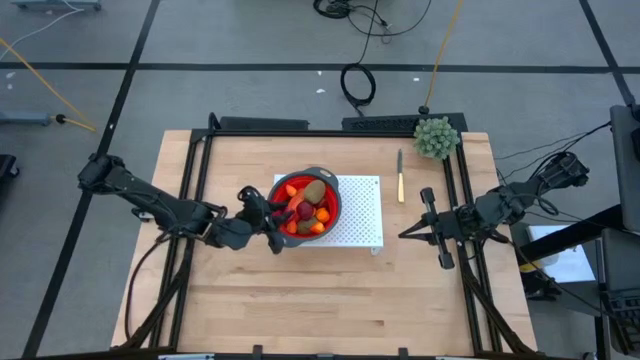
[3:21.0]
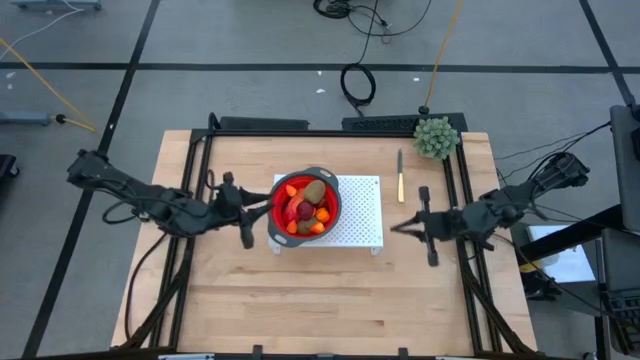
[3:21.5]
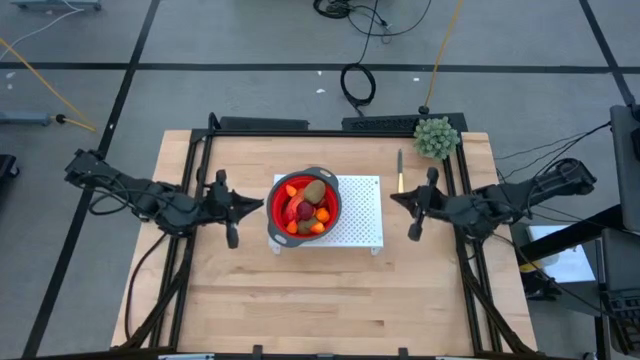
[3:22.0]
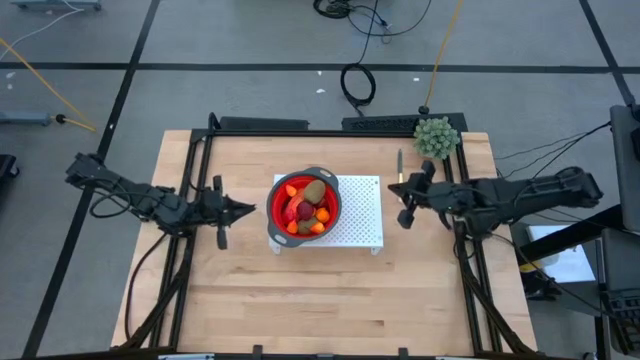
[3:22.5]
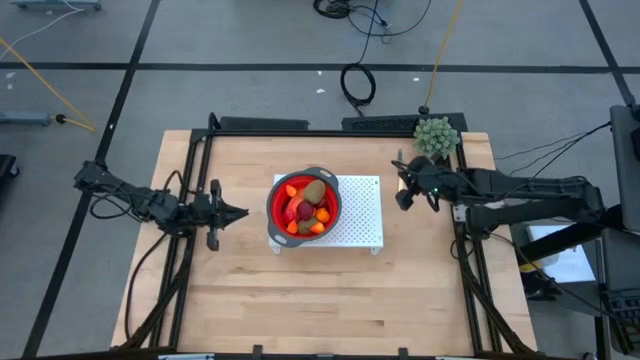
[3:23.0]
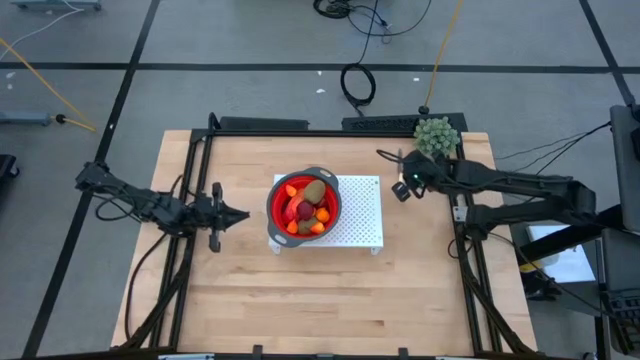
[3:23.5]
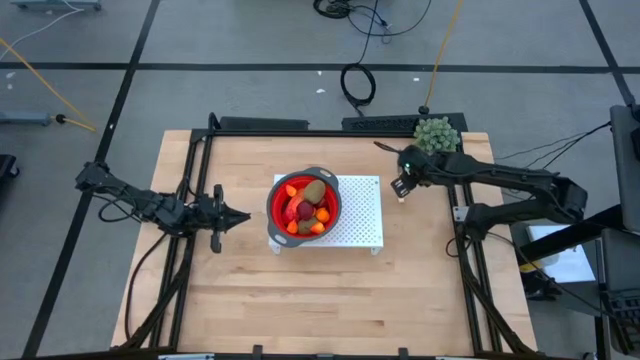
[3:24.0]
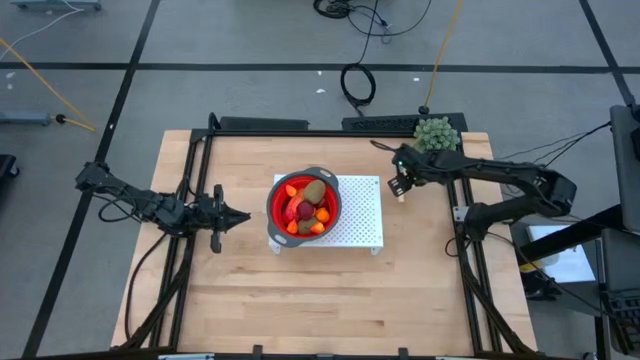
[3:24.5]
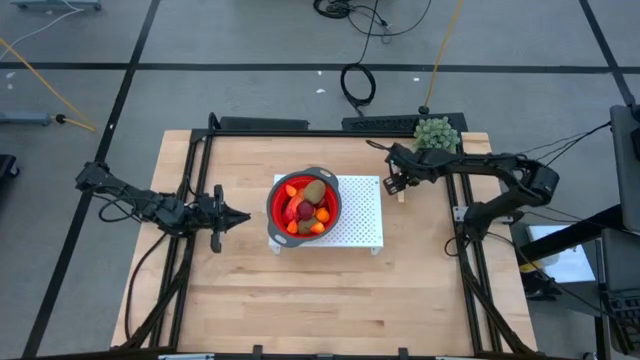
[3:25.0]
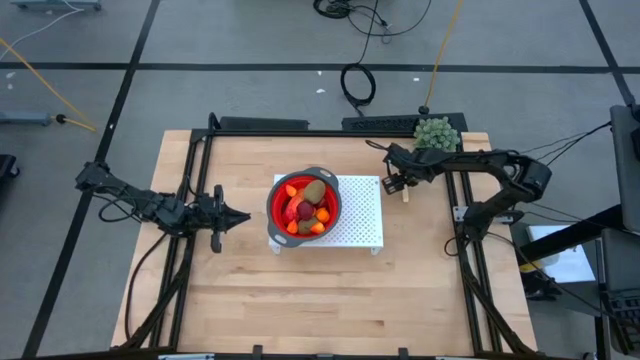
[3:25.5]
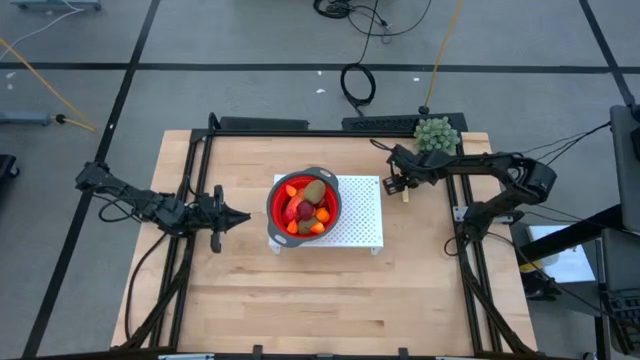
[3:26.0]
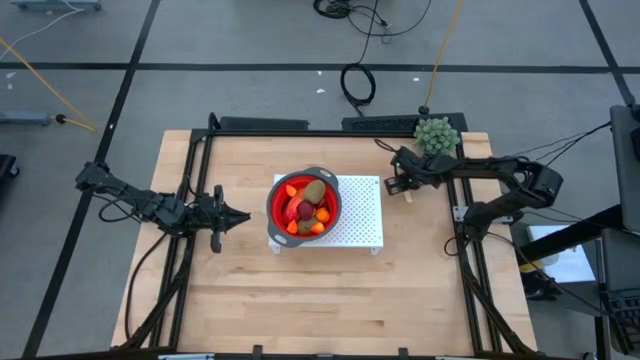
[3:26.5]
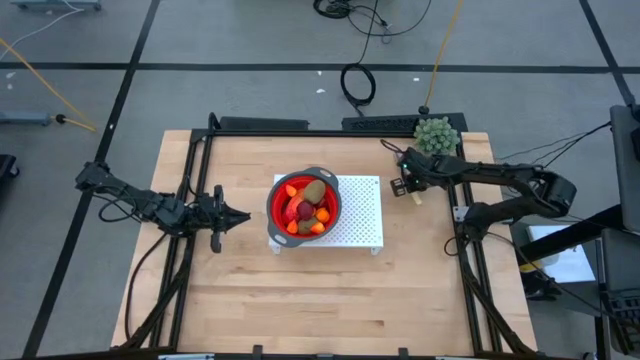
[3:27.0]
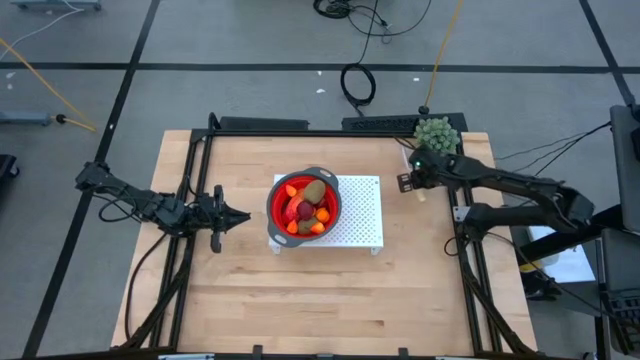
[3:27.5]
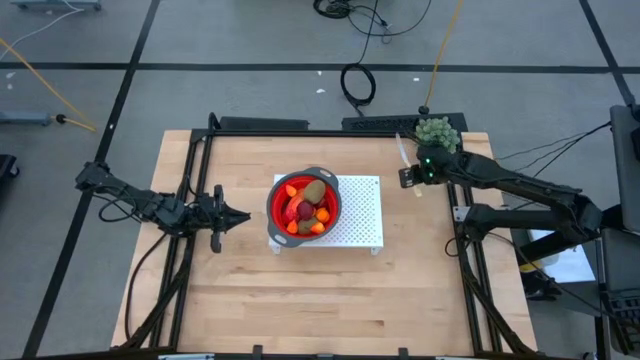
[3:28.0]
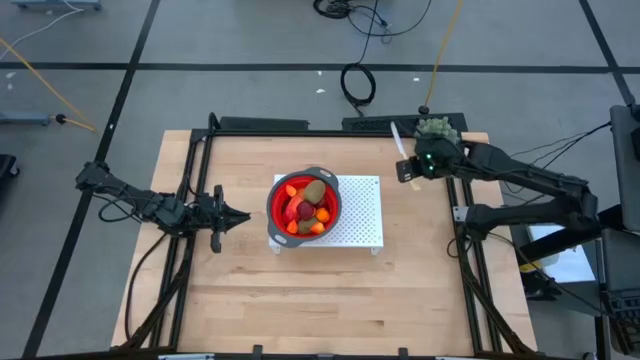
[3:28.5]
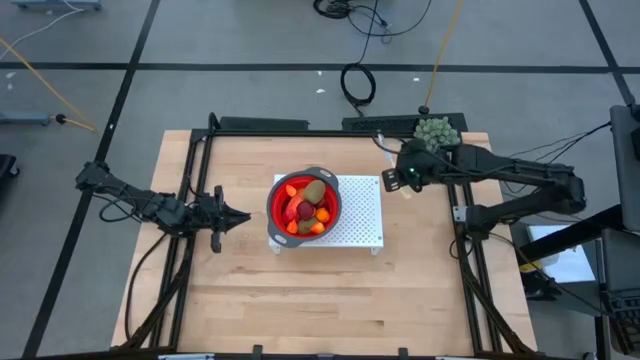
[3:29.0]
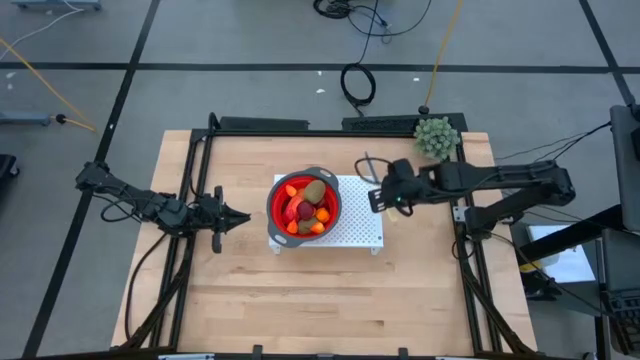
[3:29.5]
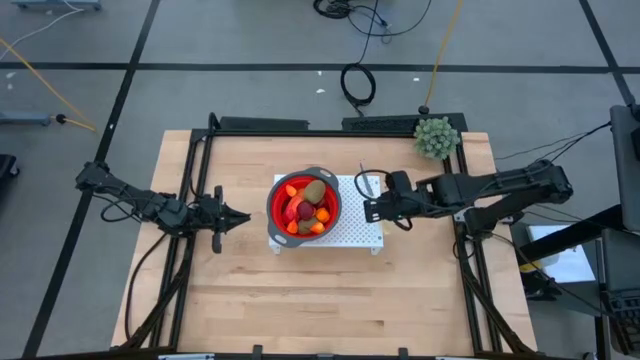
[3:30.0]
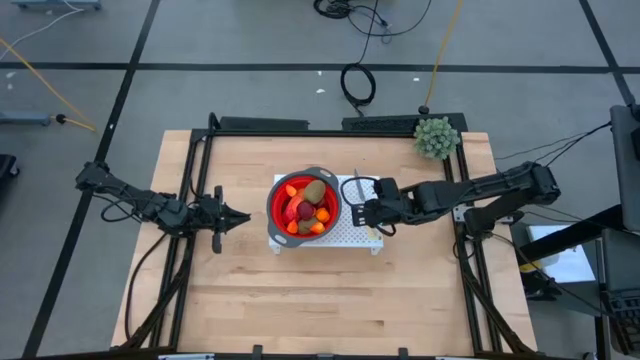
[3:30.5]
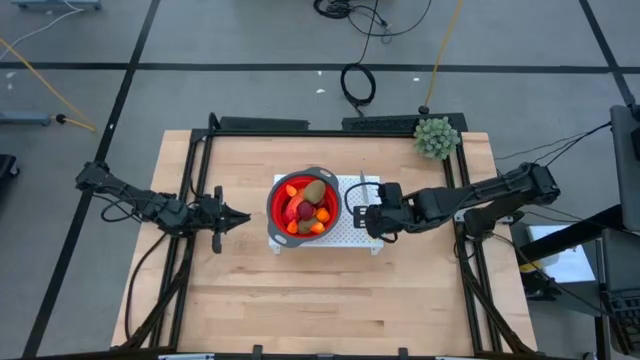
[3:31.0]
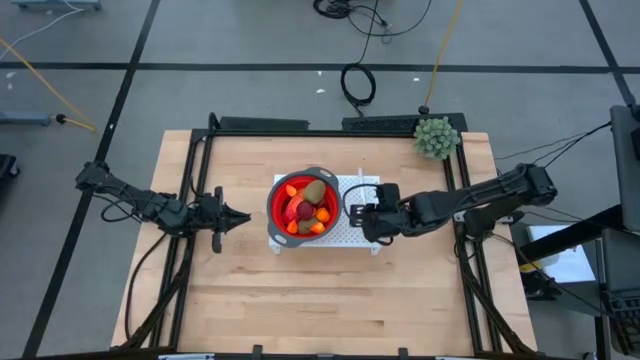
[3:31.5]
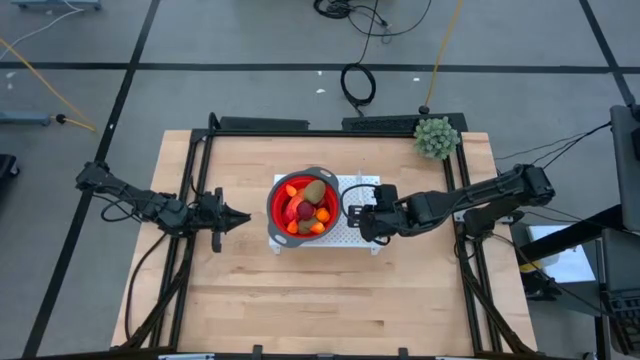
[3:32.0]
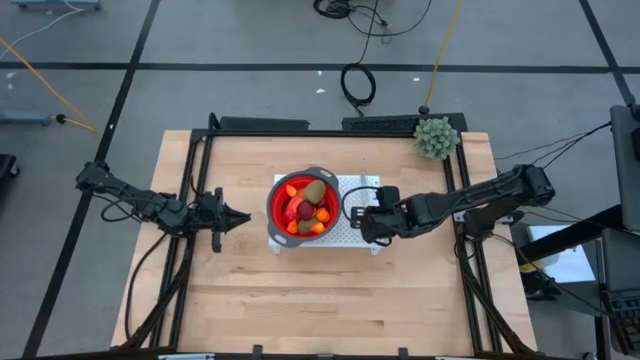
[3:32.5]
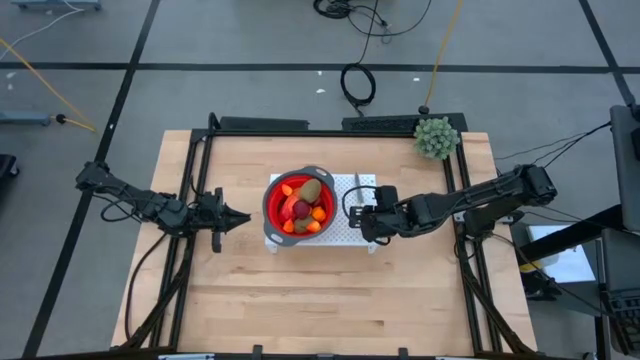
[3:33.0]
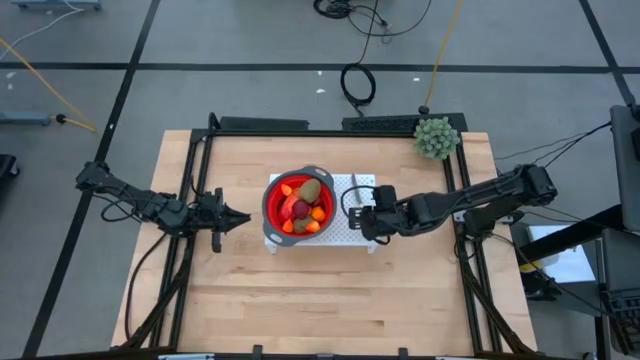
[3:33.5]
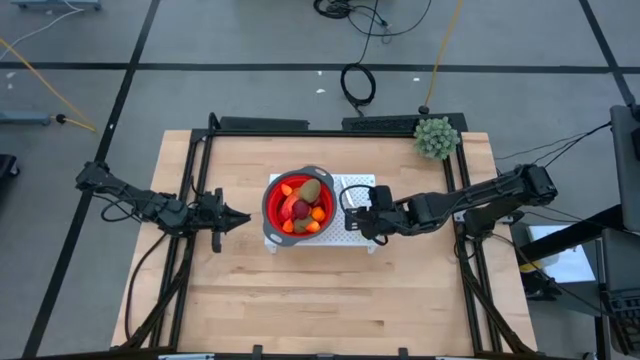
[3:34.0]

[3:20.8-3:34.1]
Task: Pick & Place Fruit
Put the knife on the shelf

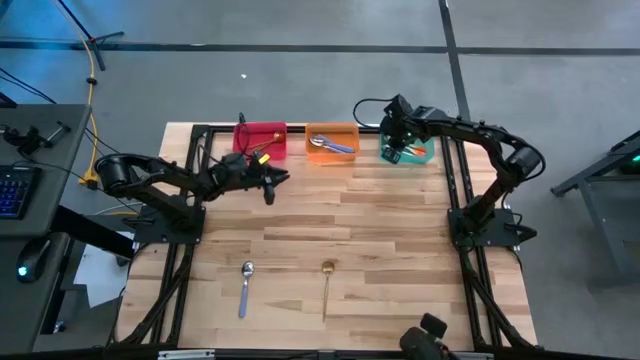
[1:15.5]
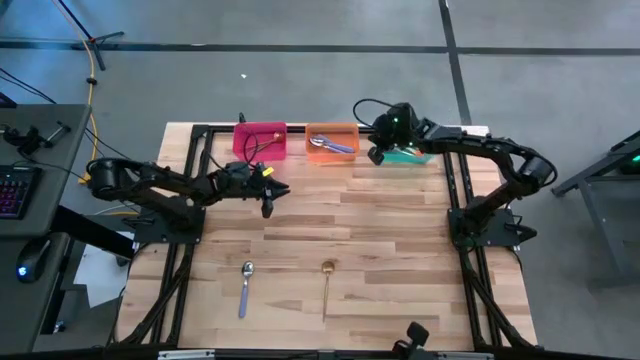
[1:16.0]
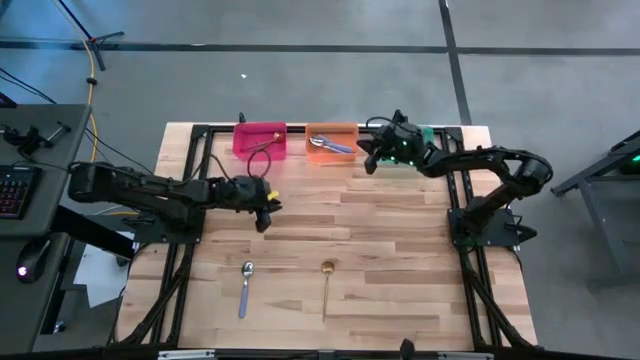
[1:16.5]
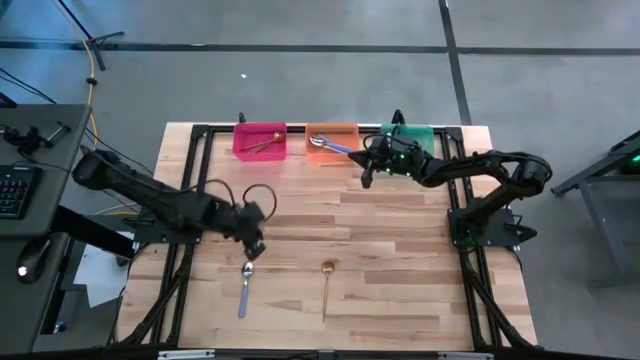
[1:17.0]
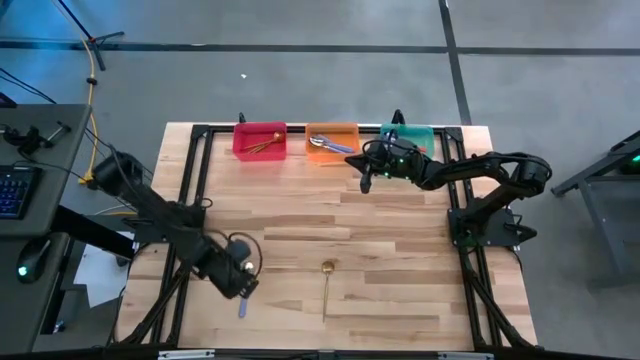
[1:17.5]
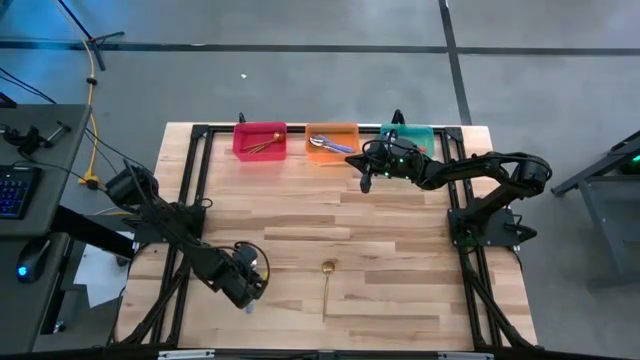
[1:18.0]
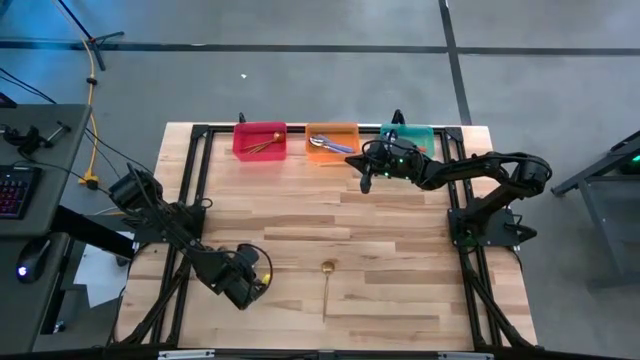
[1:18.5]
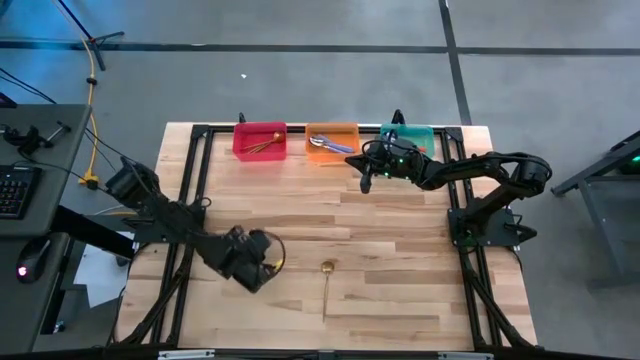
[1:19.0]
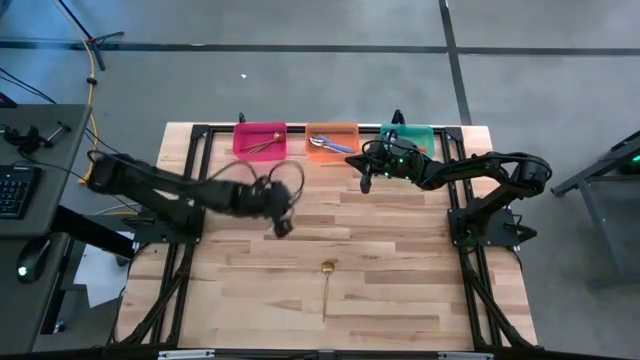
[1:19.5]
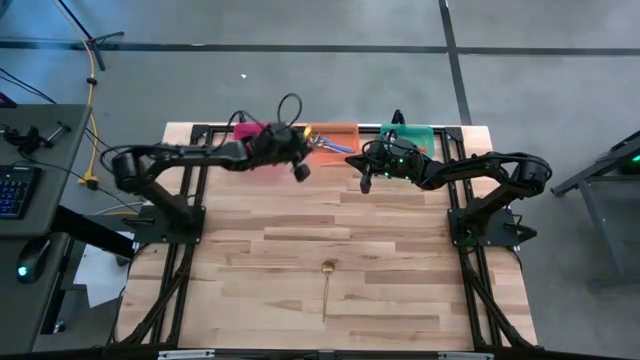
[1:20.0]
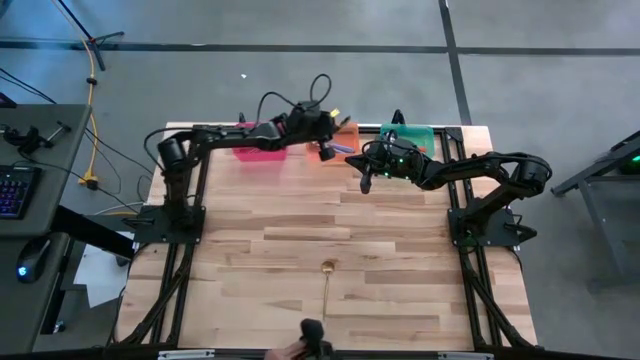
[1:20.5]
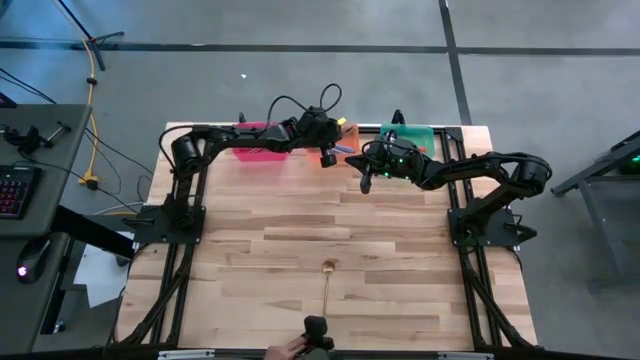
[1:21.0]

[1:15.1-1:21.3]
Task: Sort silverware by color (type)
Put the light violet spoon into the orange bin

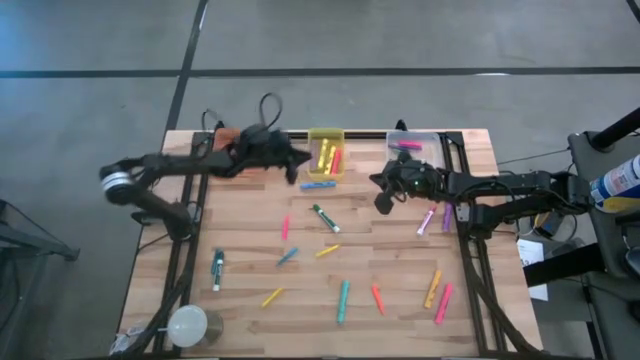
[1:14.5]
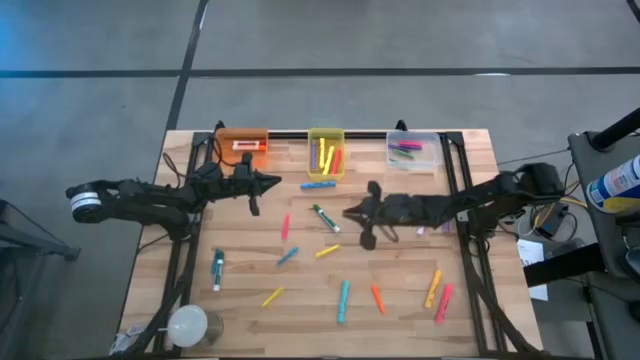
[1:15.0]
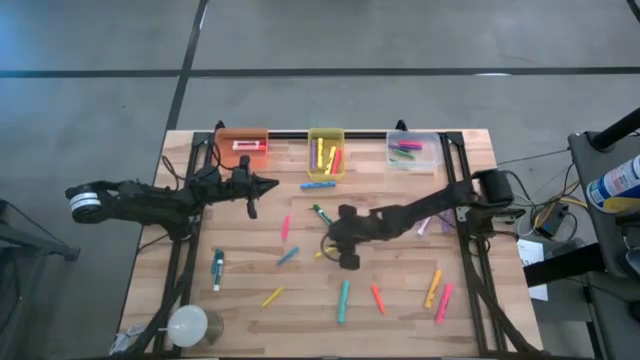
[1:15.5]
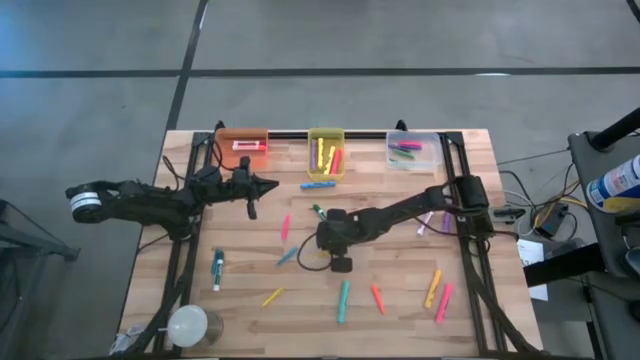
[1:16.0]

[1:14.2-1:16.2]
Task: Pick & Place Markers
Put the top yellow pen into the transparent bin

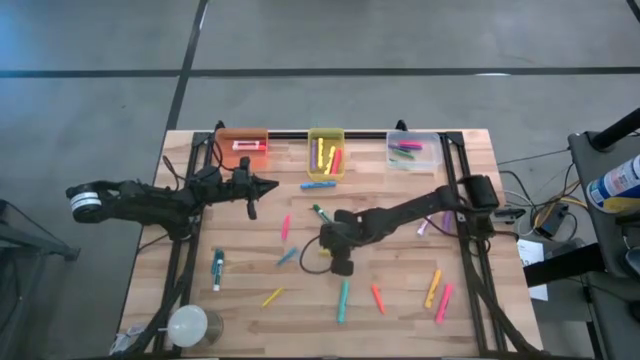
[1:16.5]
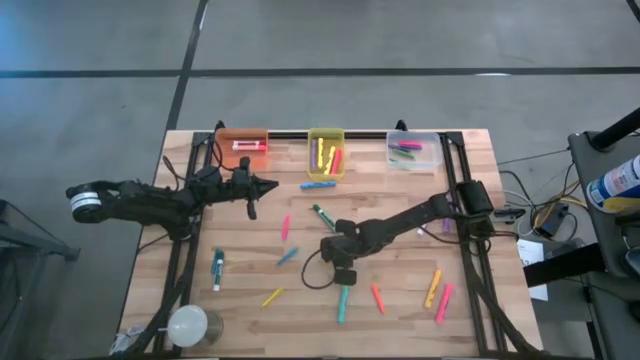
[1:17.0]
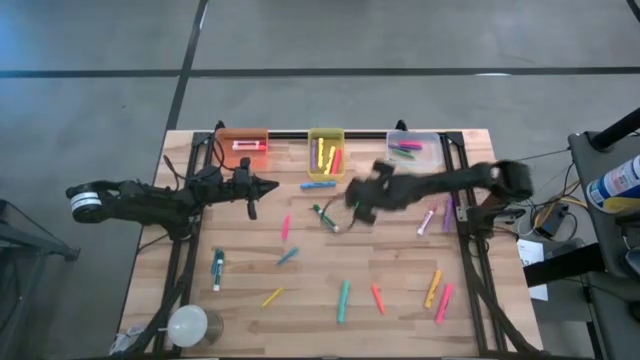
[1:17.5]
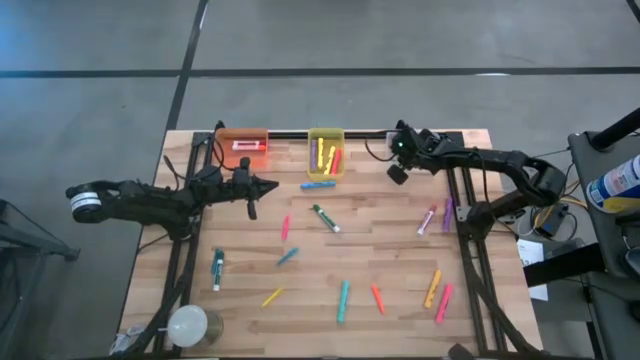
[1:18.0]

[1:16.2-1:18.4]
Put the top yellow pen into the transparent bin
